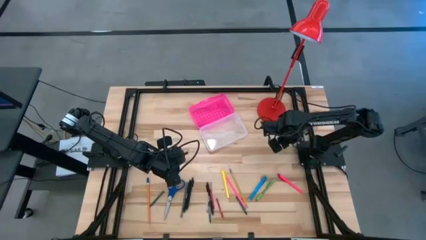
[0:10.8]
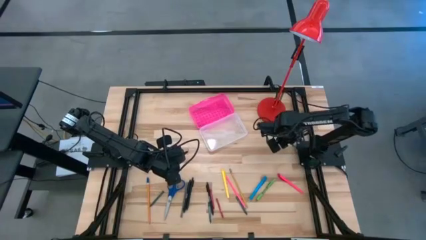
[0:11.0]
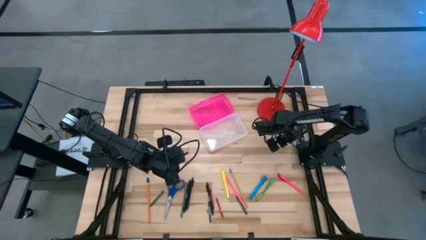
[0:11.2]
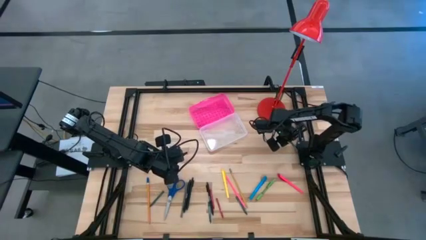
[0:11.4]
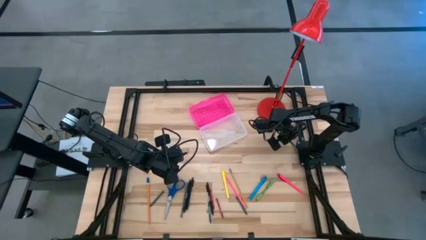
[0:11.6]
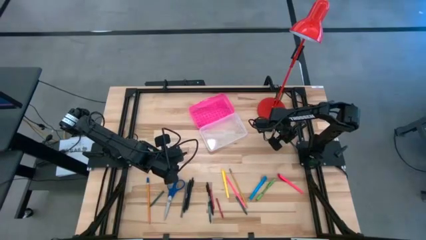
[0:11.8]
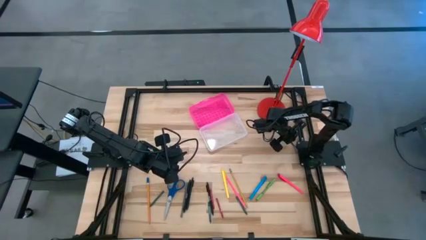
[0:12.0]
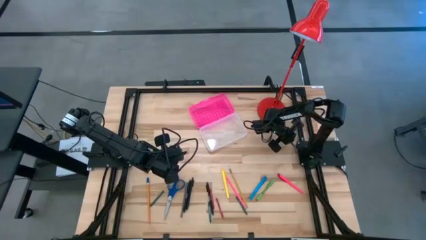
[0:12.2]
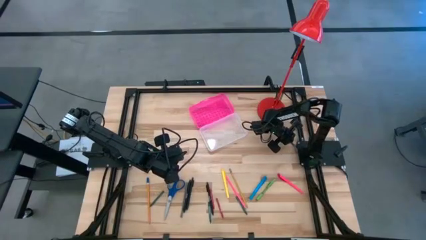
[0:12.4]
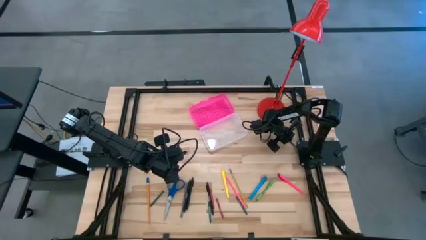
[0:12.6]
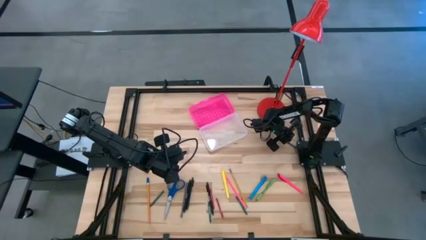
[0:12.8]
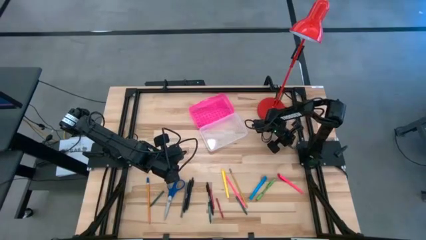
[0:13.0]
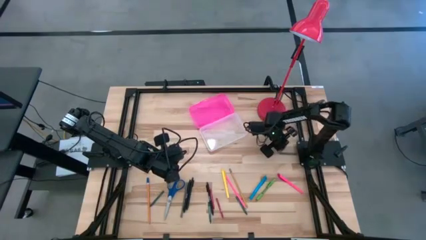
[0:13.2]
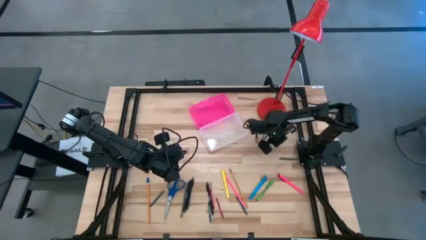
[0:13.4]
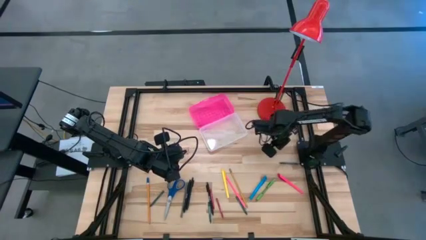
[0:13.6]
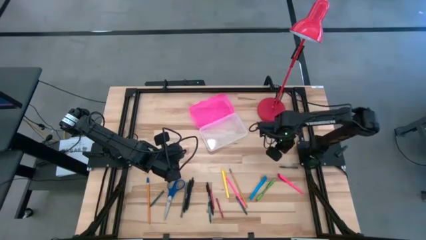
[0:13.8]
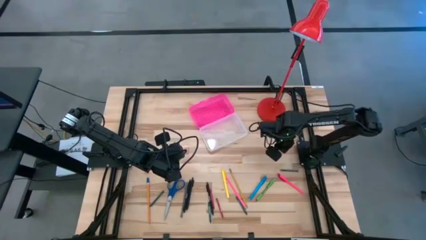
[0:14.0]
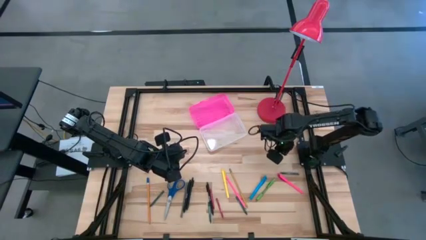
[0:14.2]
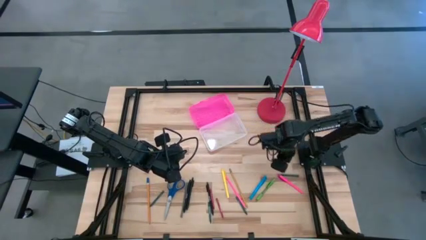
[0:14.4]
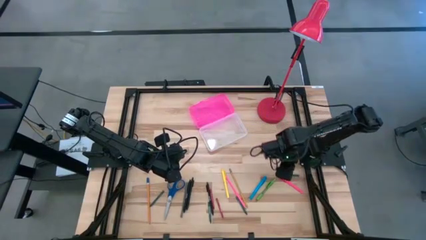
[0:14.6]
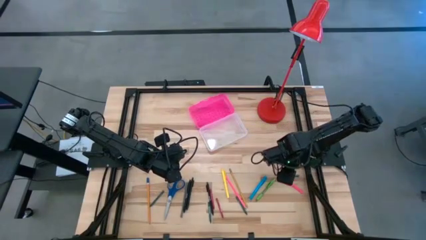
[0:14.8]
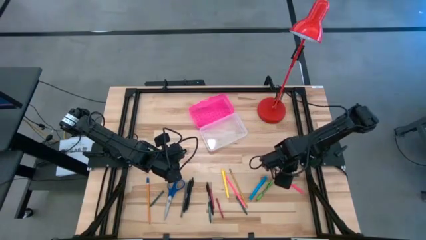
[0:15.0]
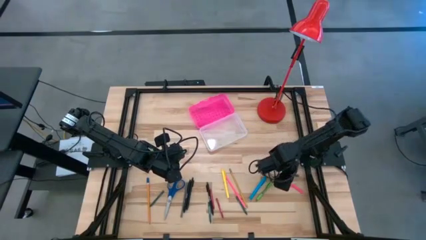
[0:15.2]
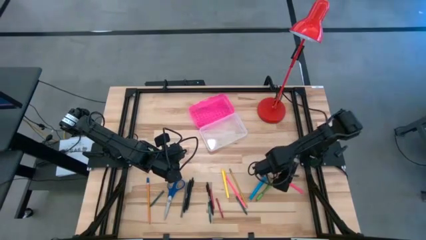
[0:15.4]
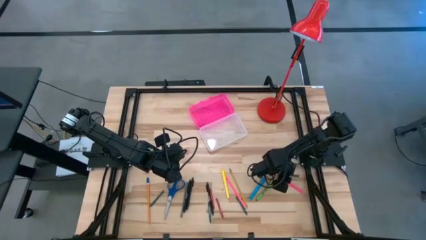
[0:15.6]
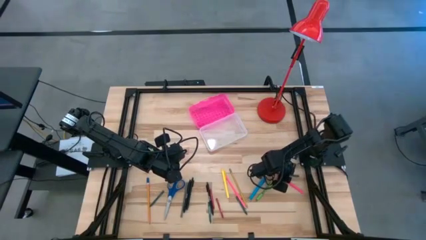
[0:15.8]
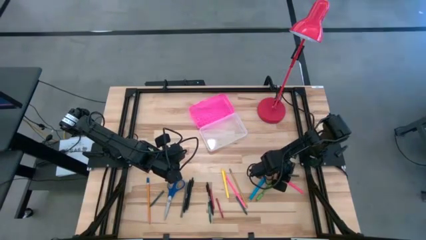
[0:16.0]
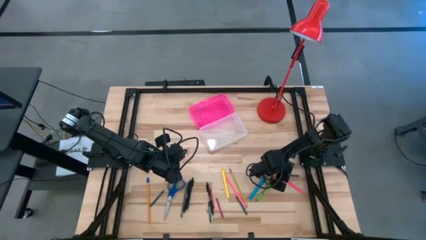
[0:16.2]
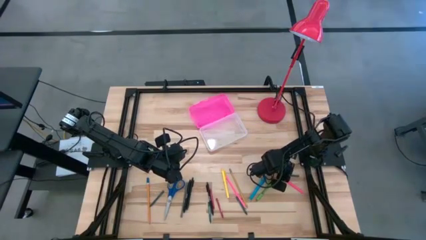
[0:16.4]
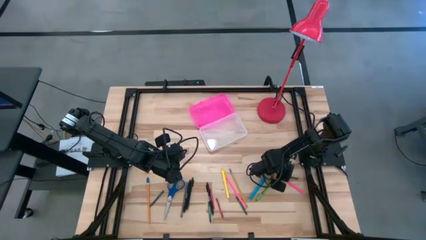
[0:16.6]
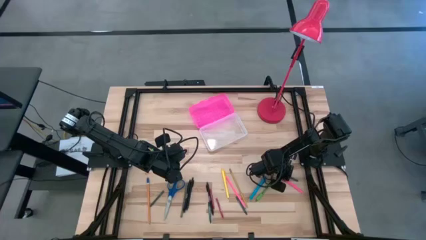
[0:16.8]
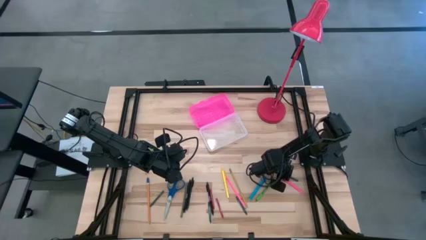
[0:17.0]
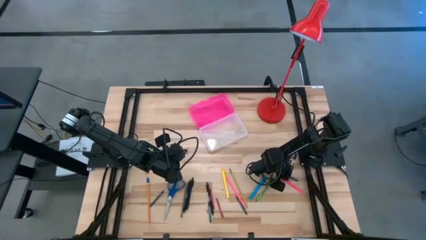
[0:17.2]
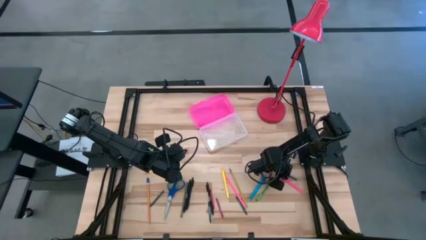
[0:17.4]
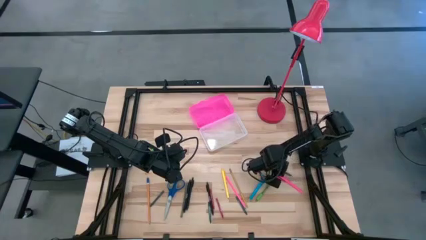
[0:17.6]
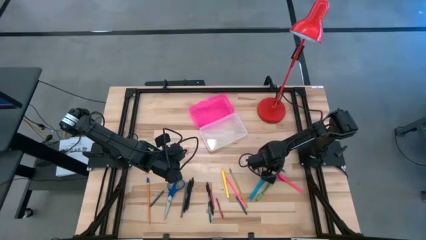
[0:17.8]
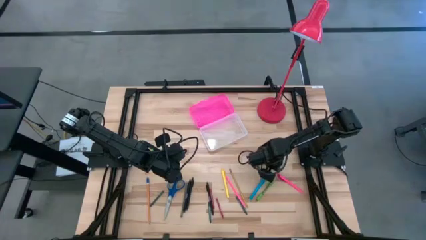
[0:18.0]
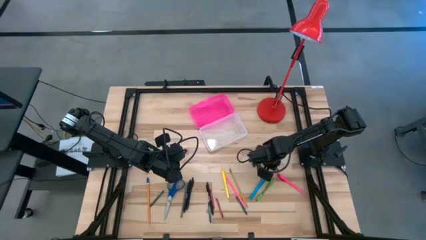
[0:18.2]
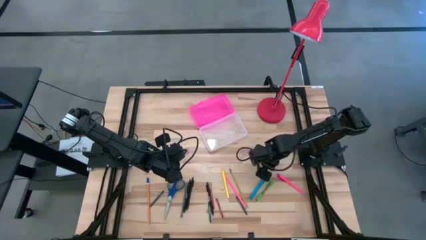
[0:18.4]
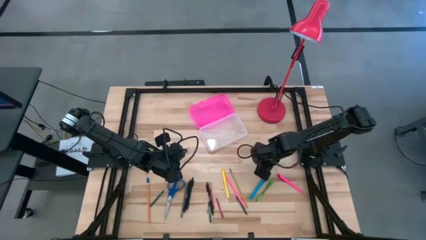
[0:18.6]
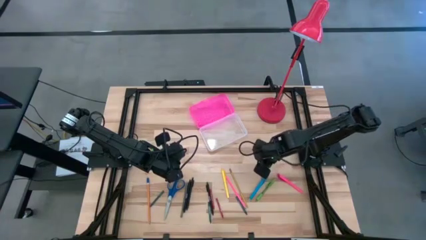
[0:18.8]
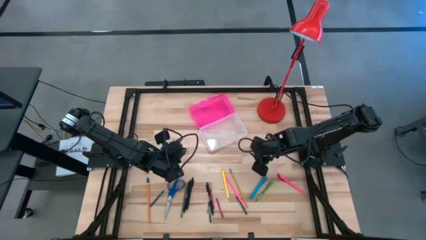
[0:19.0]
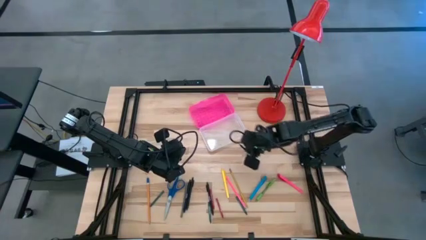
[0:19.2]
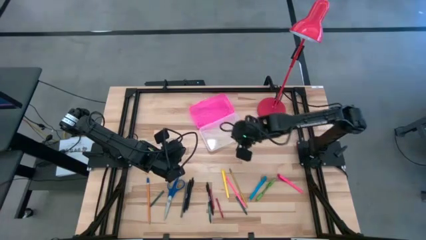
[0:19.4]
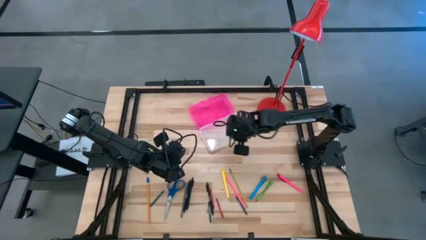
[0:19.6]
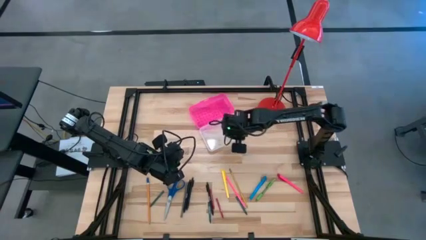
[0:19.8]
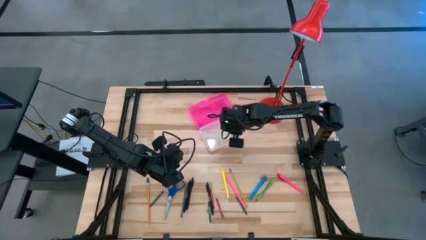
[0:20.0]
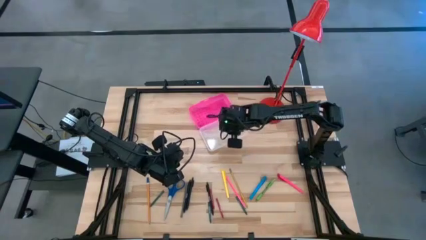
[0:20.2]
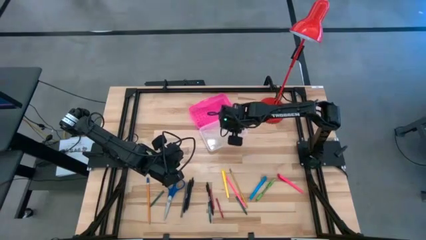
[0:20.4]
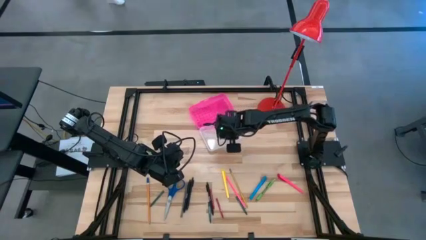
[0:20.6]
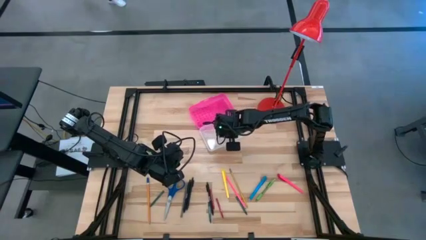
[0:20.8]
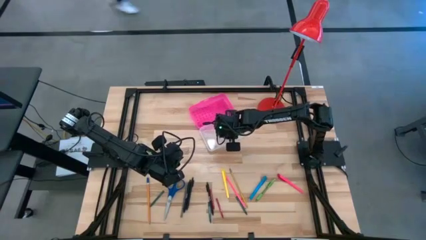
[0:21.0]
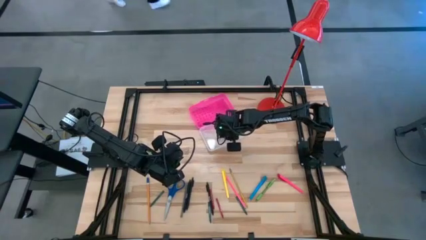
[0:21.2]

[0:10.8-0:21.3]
Task: Pick & place school supplies into a supply box
Put the green crayon into the pink supply box

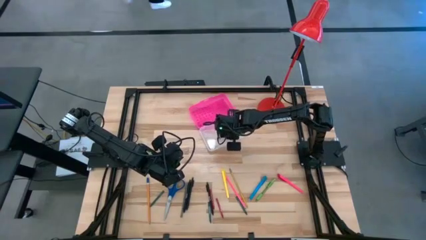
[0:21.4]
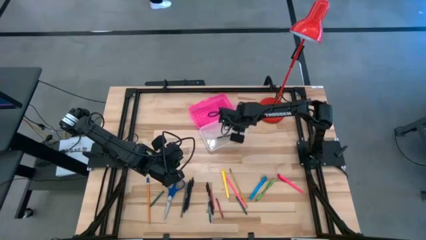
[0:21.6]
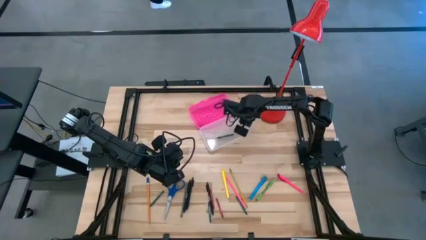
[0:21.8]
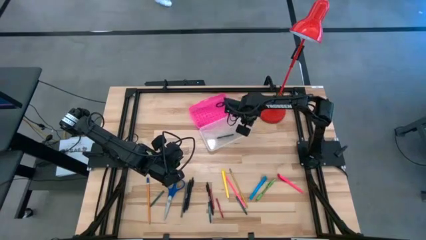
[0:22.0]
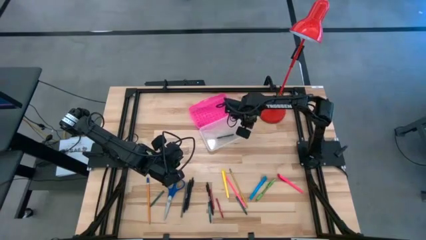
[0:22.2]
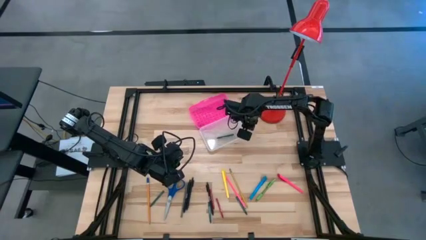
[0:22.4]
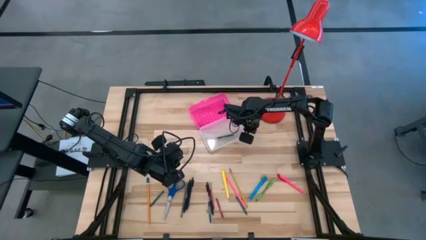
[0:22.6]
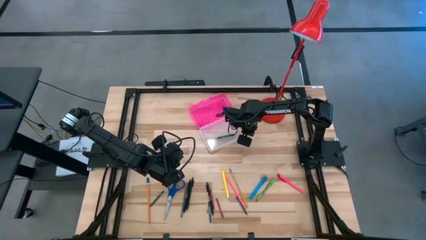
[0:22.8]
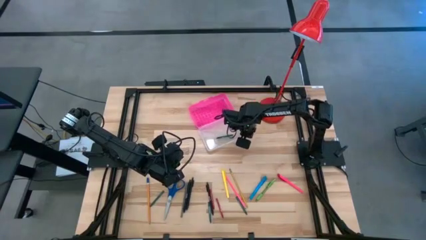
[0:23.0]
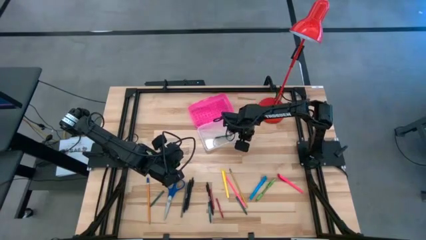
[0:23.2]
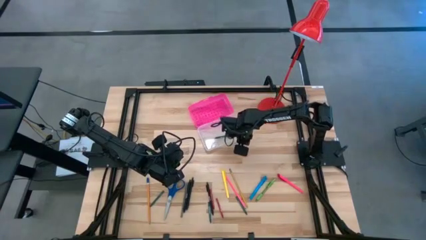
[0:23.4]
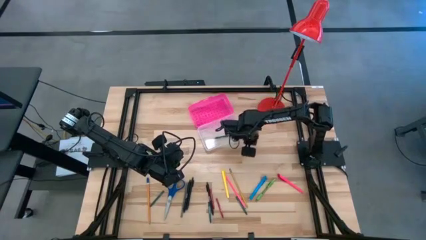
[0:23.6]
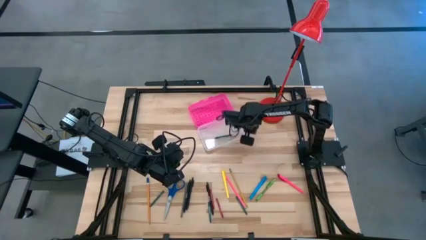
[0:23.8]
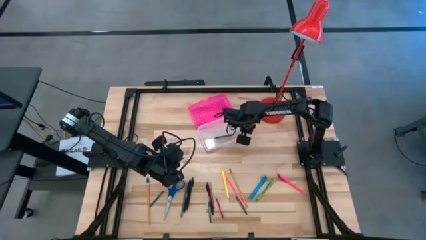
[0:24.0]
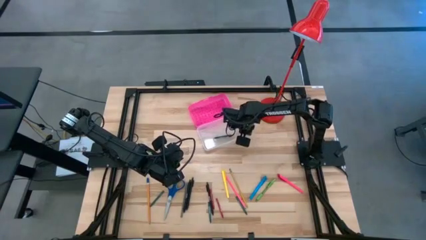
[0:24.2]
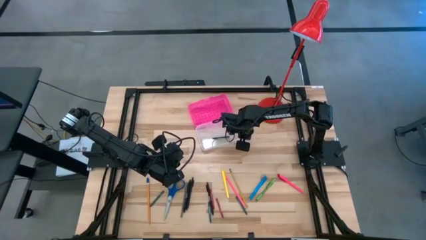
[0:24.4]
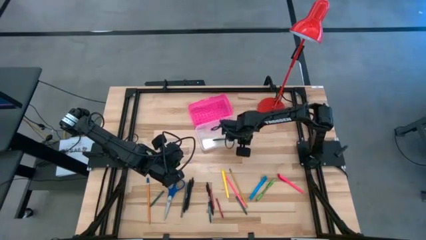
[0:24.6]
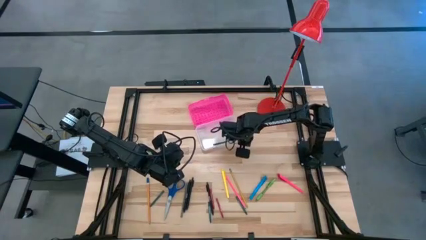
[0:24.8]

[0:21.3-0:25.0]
Adjust the pink supply box

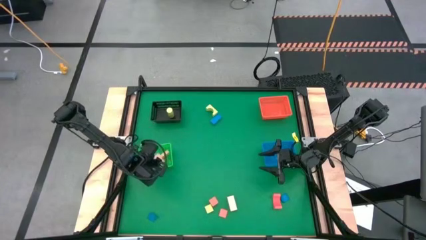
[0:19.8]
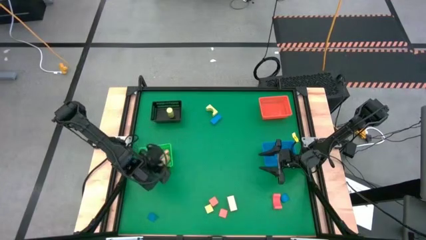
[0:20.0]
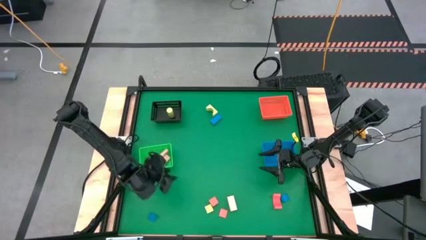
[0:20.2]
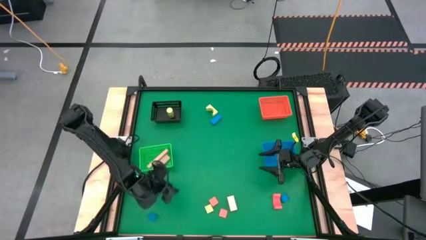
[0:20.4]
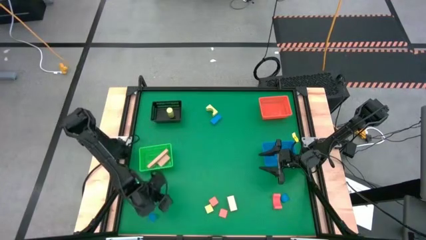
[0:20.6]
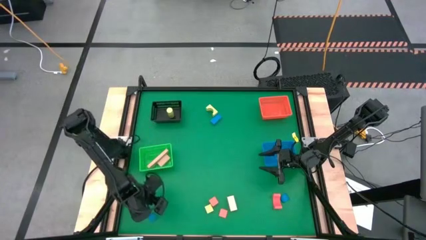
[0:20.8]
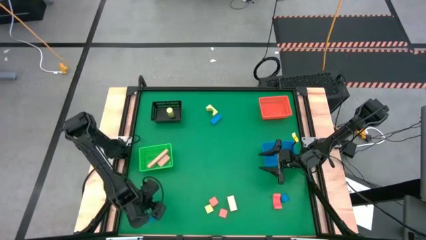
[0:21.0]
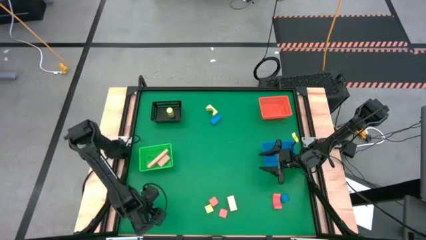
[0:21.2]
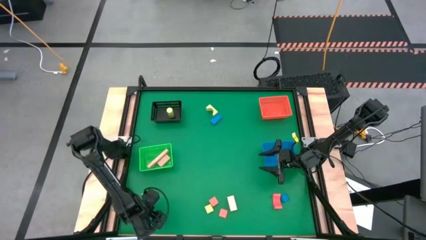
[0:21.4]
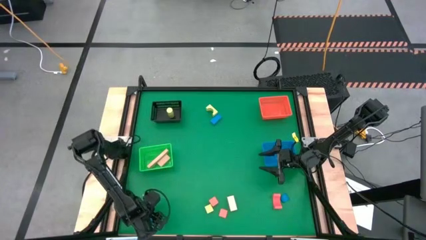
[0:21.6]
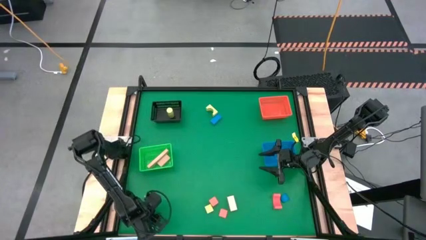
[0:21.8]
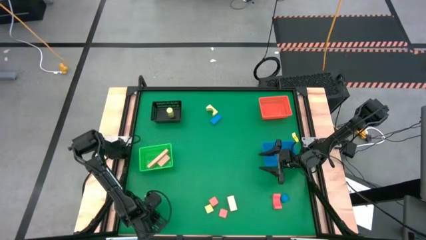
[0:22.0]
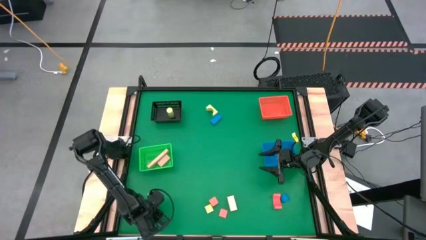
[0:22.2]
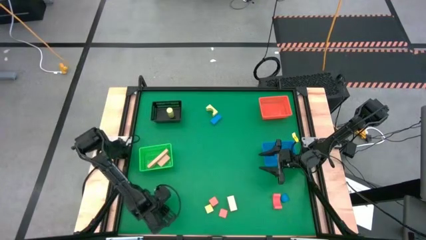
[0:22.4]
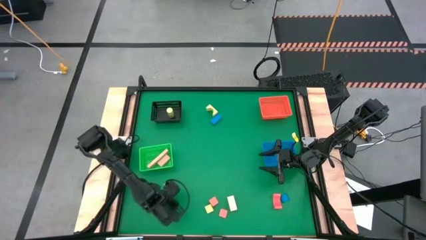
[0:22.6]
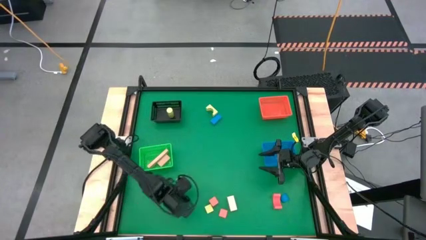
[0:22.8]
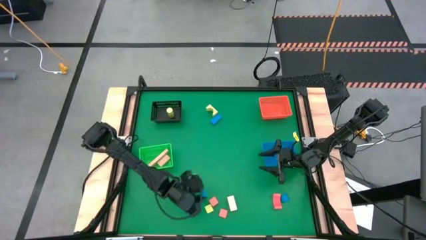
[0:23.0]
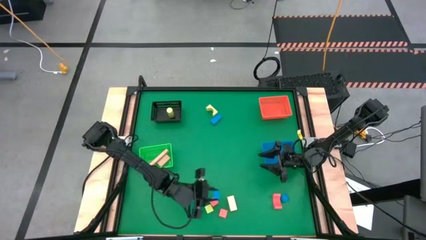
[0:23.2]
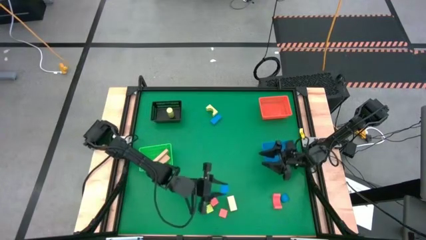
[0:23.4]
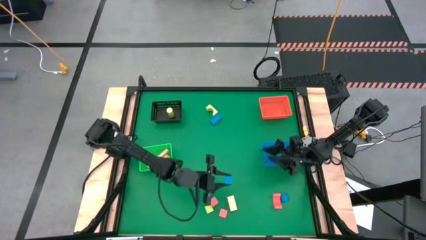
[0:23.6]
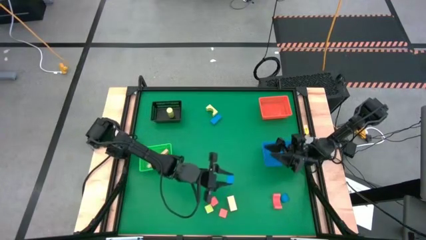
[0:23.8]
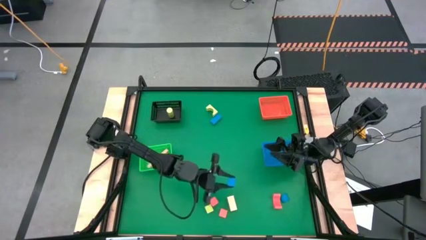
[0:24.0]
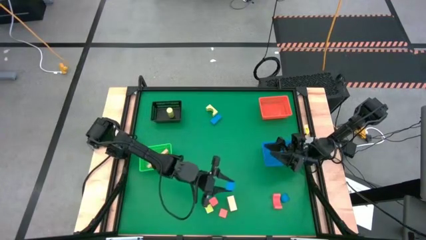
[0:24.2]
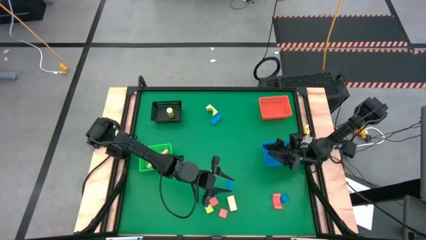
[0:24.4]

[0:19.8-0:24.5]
Task: Sort & place blocks by color
Put the blue block into the orange bin
